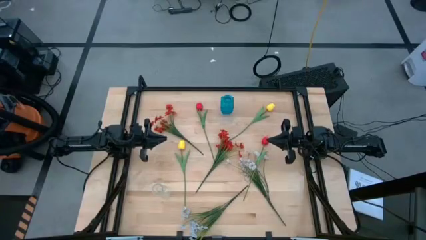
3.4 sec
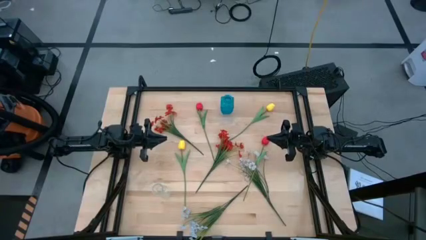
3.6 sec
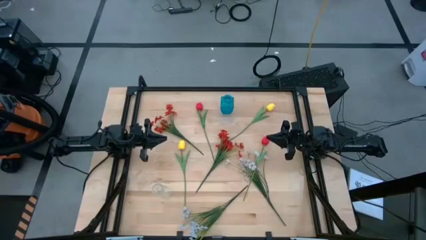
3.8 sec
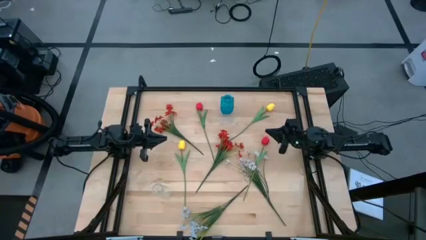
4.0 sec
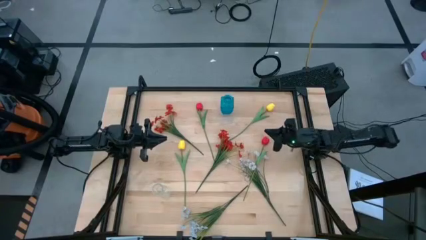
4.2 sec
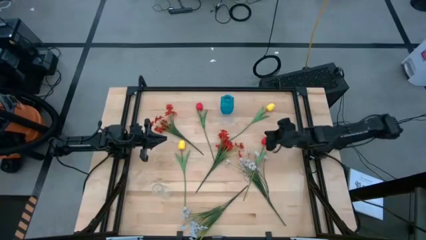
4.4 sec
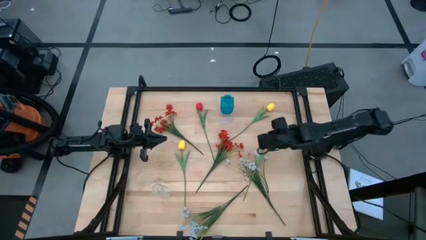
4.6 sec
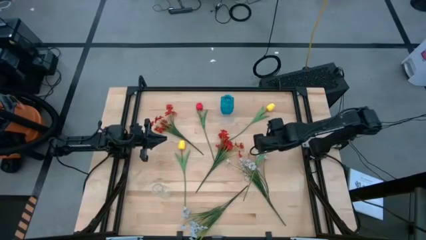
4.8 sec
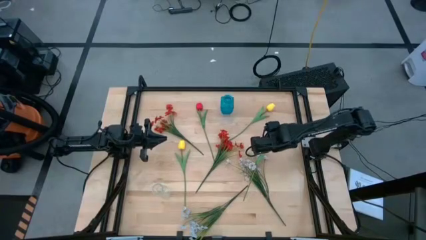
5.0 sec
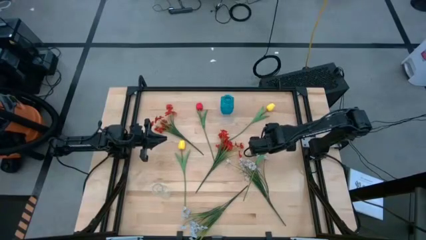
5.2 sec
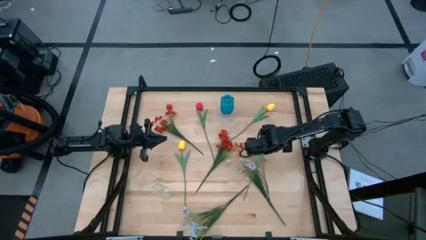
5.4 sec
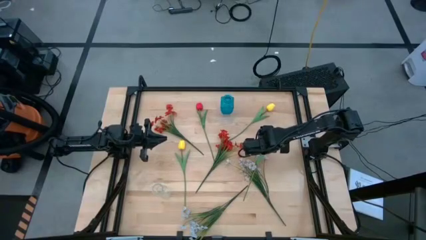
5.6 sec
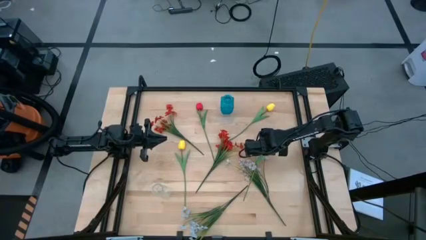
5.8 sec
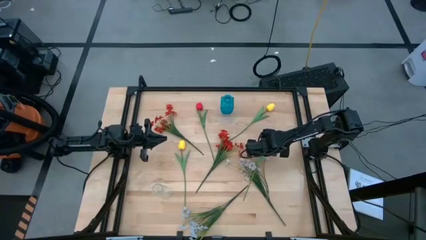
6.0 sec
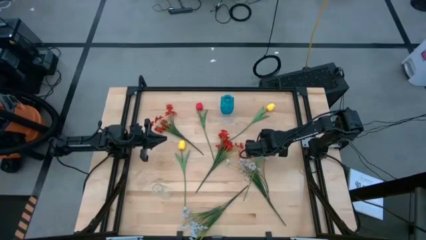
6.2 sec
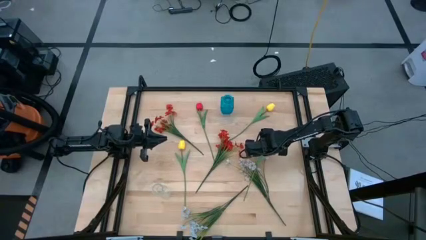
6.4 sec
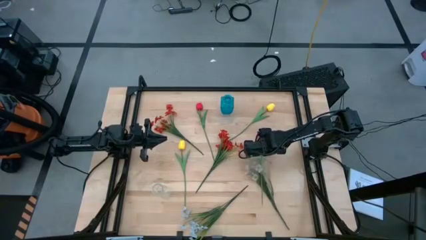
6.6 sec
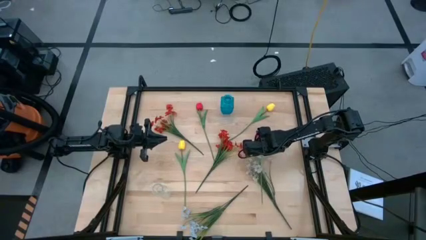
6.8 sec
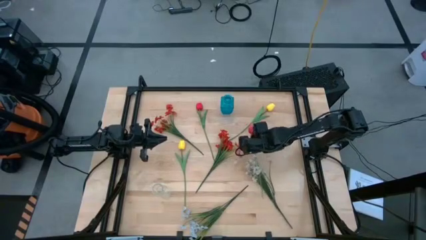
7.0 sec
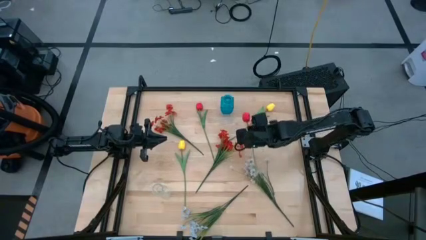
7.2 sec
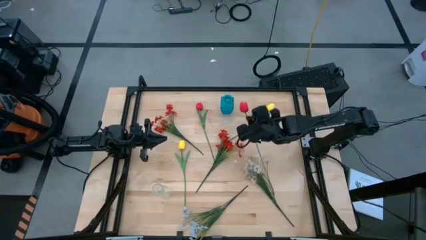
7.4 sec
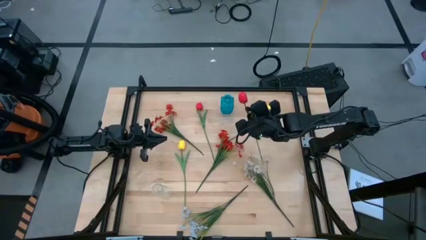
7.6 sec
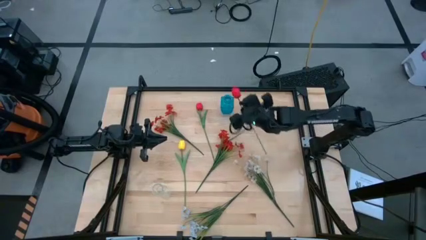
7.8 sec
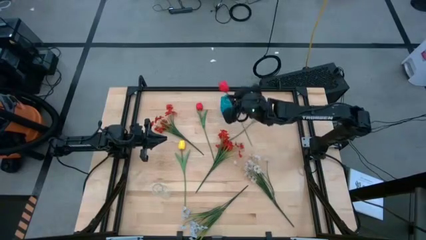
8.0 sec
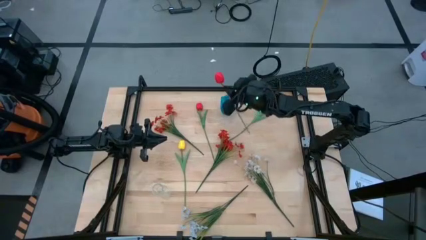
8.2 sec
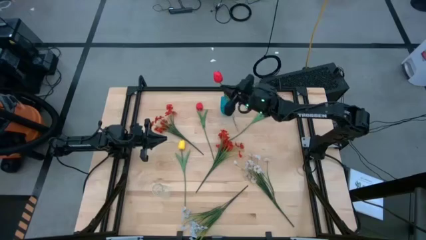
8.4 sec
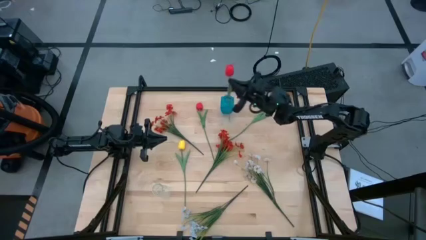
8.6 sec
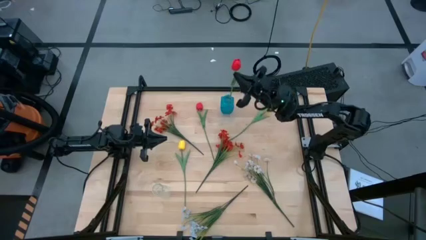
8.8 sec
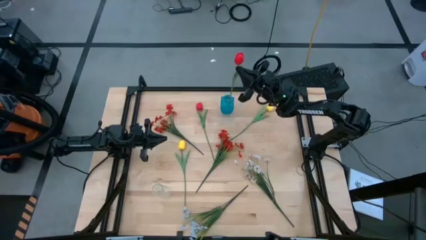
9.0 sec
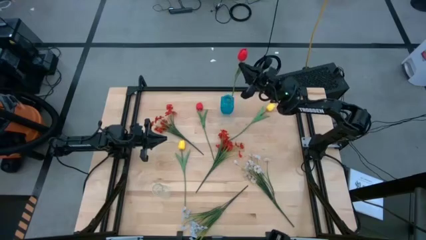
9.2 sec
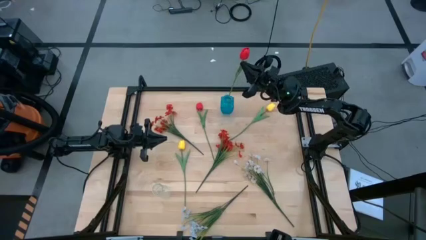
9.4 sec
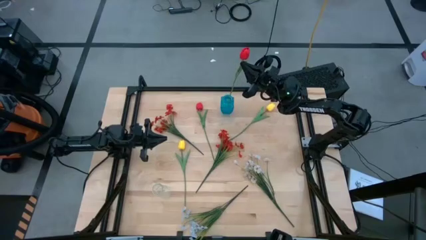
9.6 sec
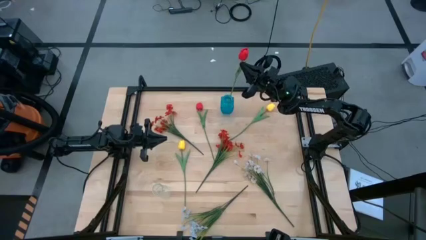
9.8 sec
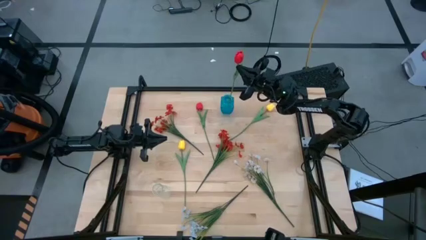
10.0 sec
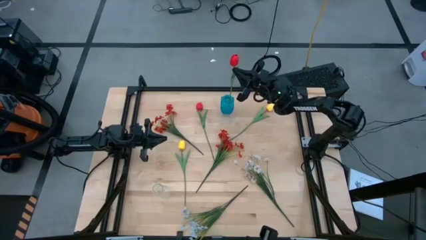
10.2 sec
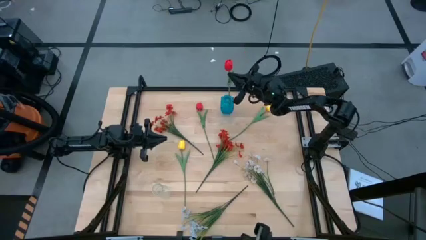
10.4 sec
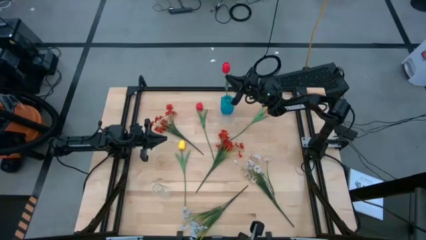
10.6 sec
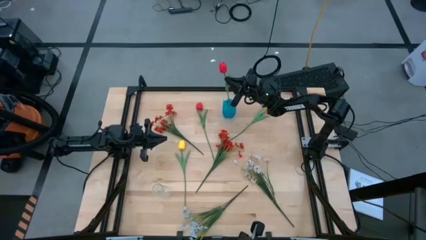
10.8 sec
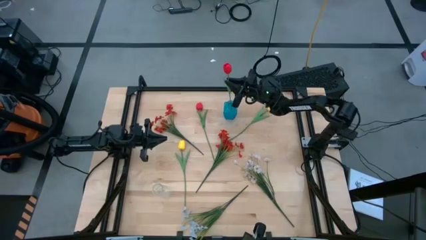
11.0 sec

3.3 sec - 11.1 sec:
Task: Sort flowers into vase by color
Put the bottom red flower into the blue vase

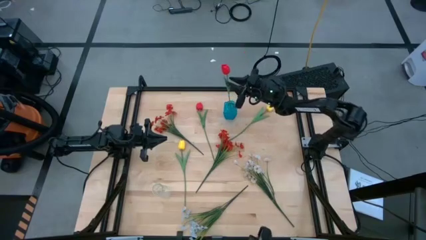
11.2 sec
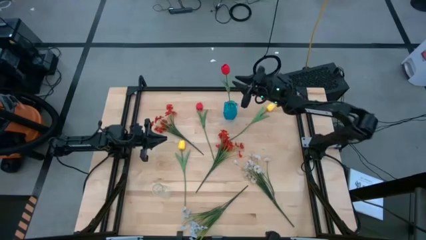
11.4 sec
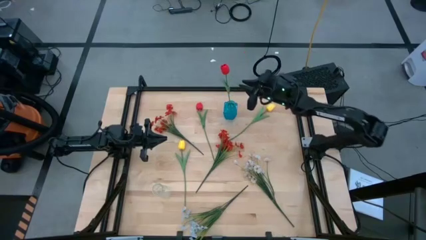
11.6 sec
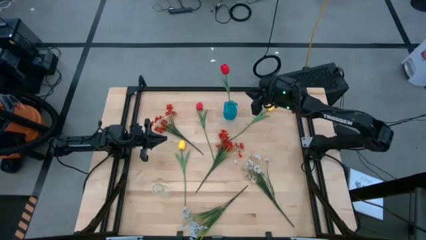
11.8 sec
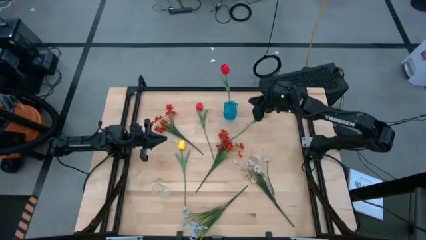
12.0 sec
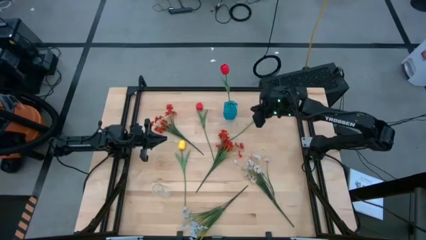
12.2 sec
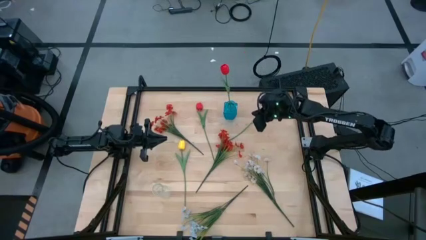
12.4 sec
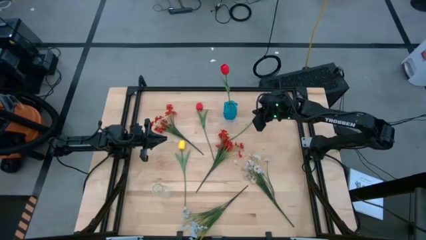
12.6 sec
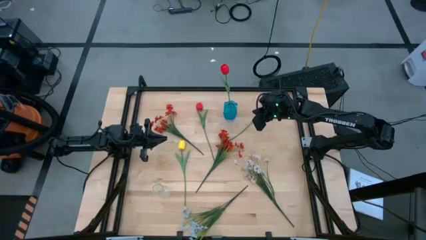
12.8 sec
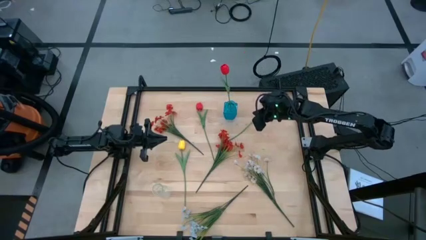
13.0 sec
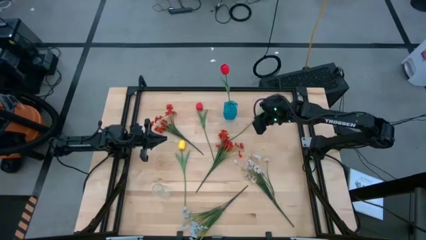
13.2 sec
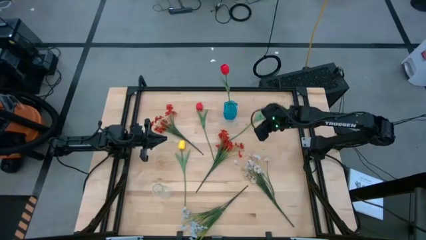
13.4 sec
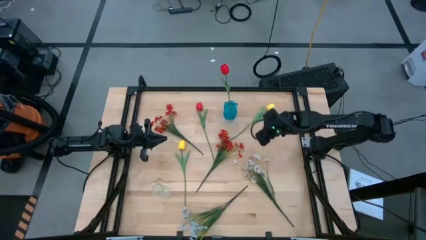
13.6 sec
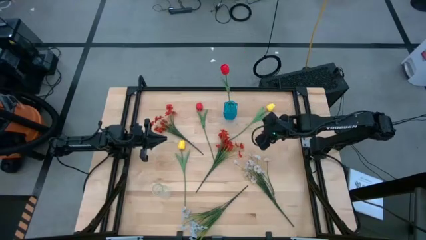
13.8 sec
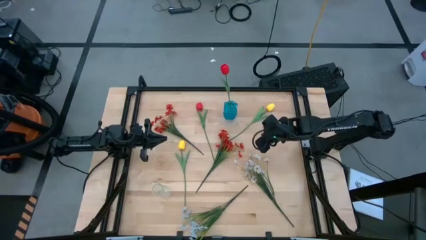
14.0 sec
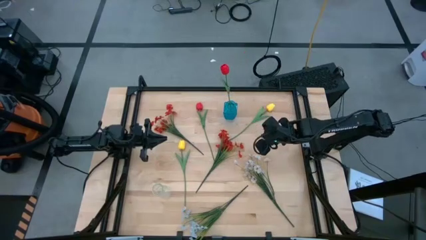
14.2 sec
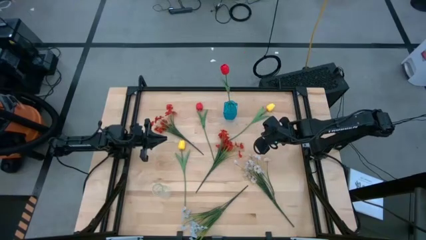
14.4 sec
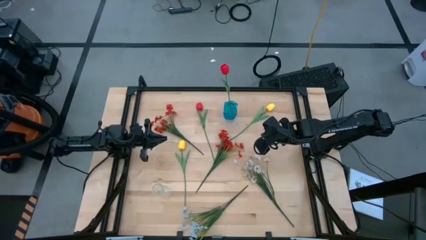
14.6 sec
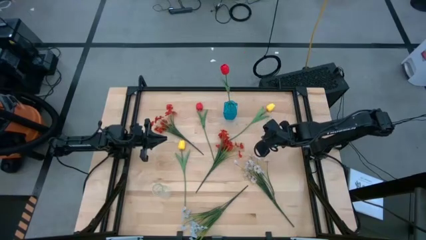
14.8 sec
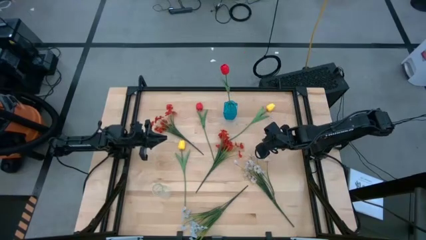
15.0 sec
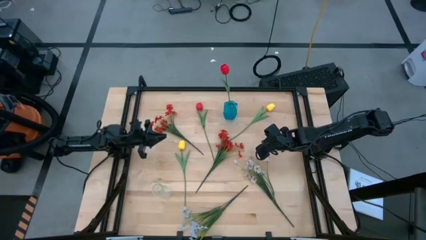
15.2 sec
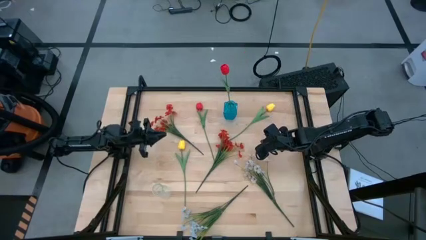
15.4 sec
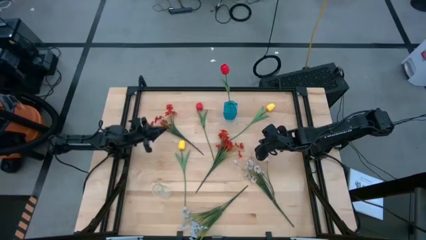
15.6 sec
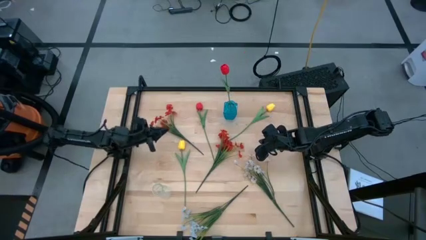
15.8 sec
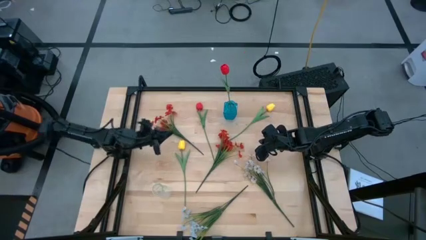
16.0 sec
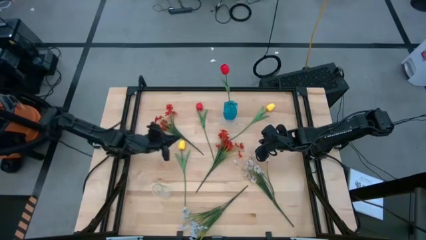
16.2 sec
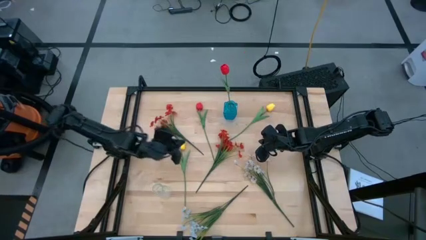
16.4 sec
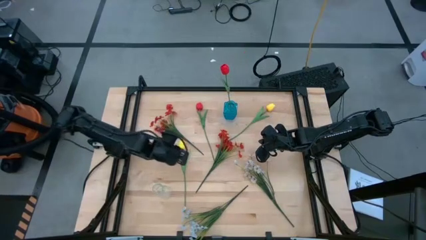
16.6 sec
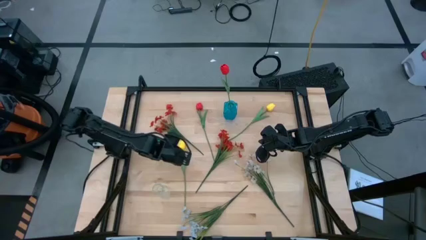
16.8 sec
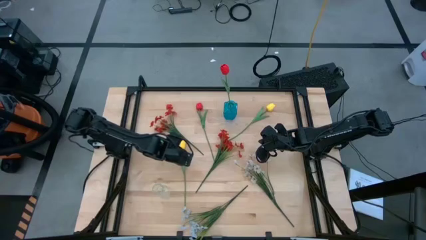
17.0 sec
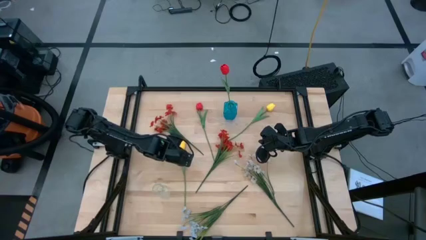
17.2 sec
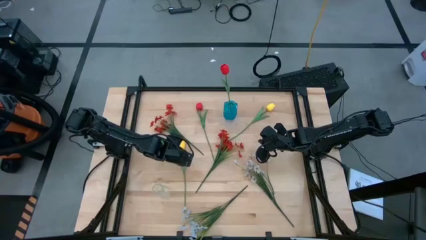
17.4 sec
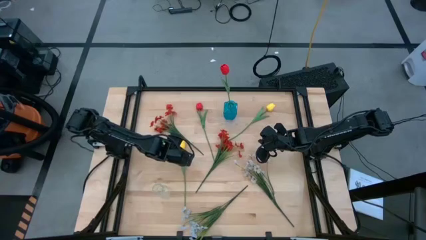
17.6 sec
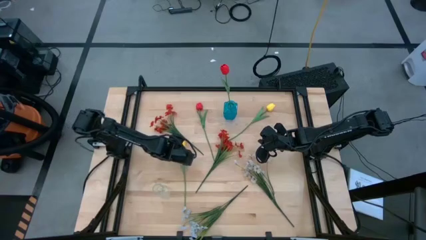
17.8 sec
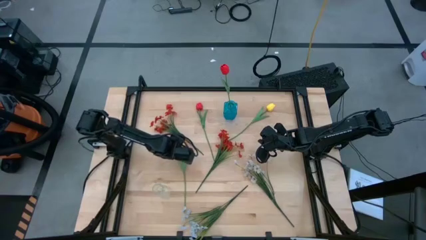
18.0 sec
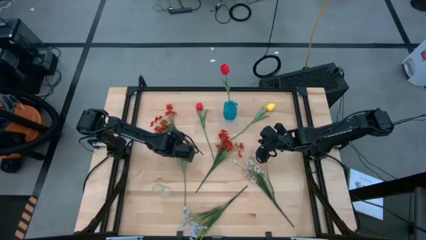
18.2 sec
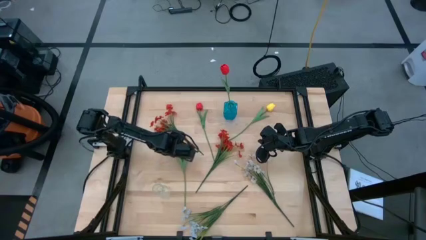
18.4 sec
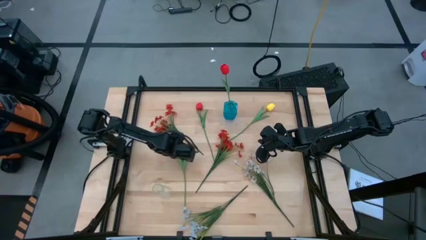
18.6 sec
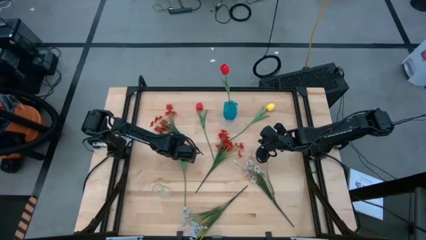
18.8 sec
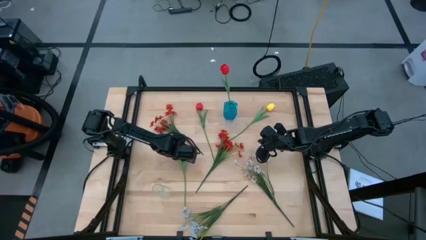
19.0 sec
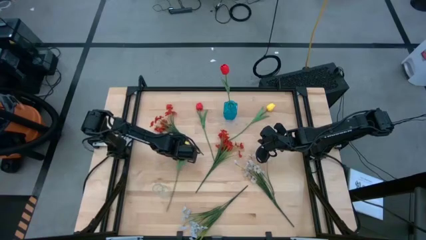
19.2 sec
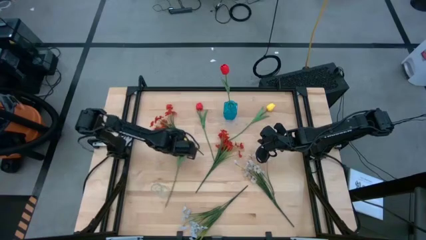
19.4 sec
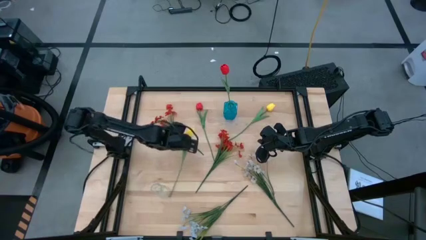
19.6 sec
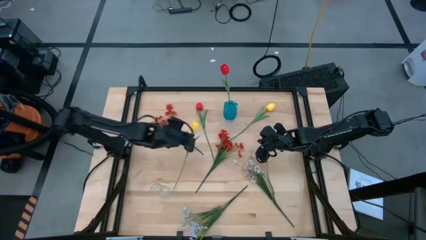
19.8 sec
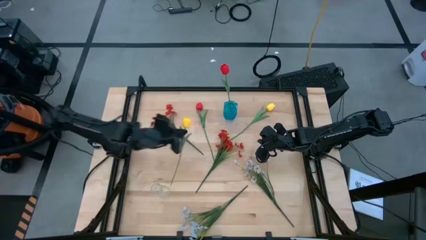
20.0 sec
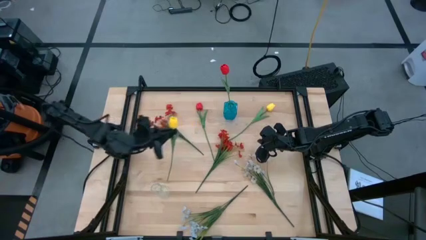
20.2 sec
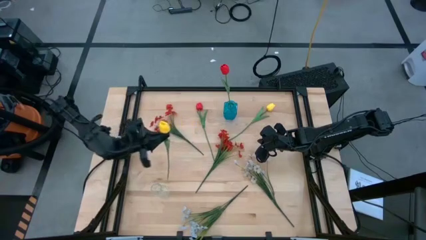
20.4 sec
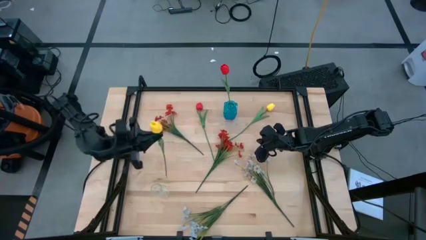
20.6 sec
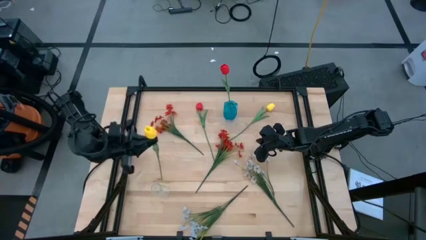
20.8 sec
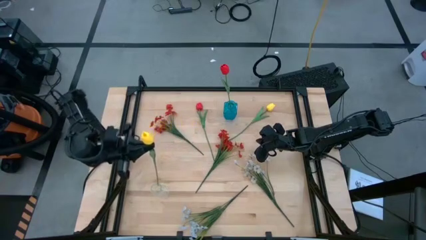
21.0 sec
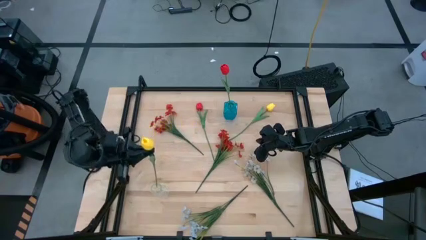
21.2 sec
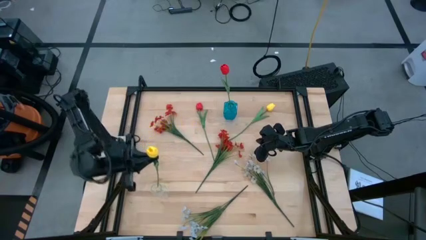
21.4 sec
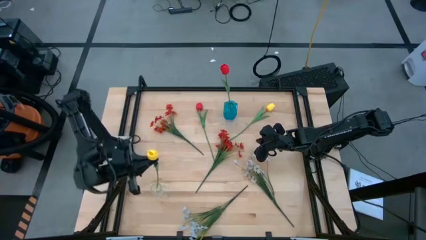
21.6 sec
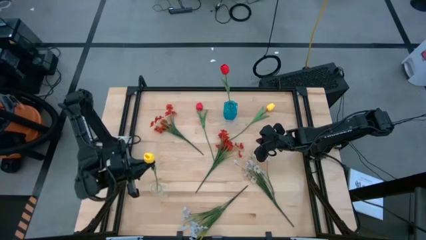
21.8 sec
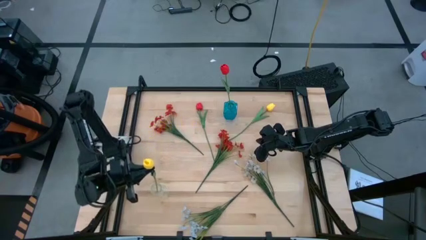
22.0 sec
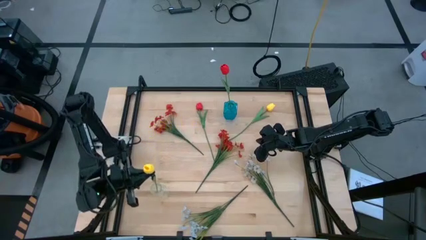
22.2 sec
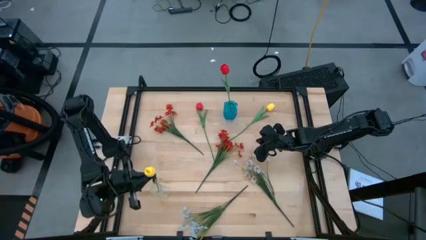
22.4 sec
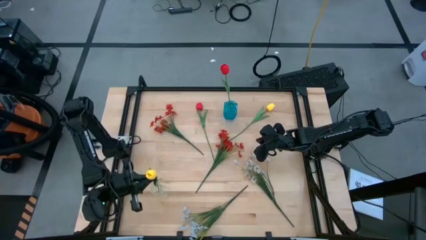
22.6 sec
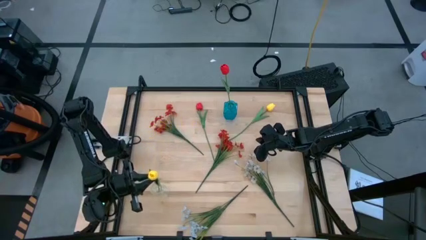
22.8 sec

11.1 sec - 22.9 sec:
Put the bottom yellow flower into the transparent vase
